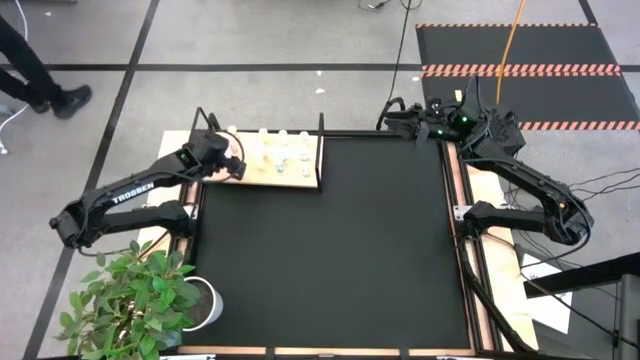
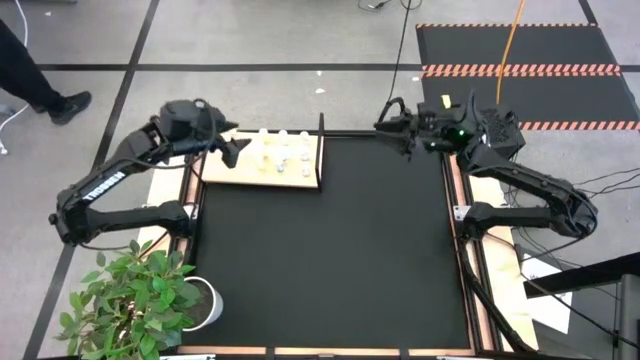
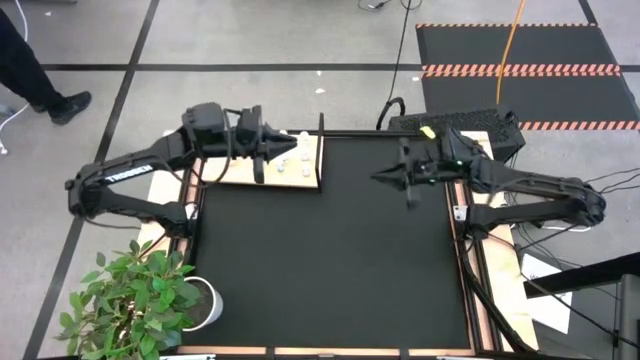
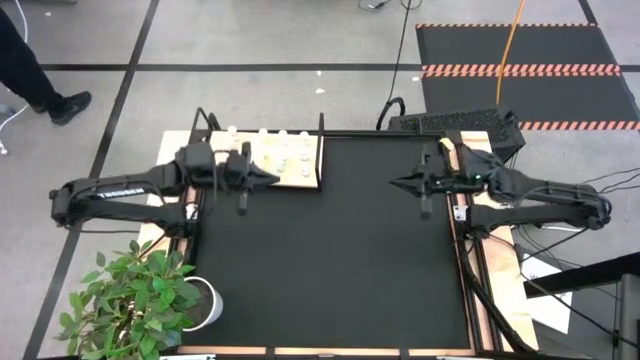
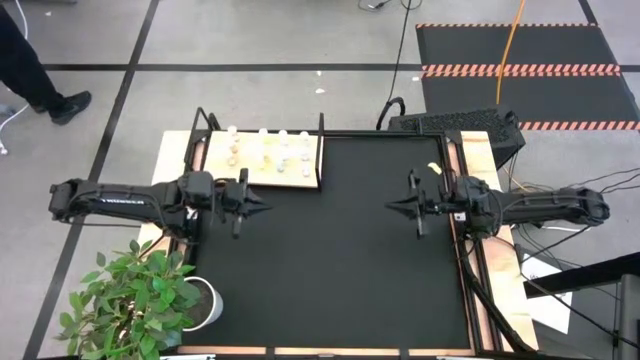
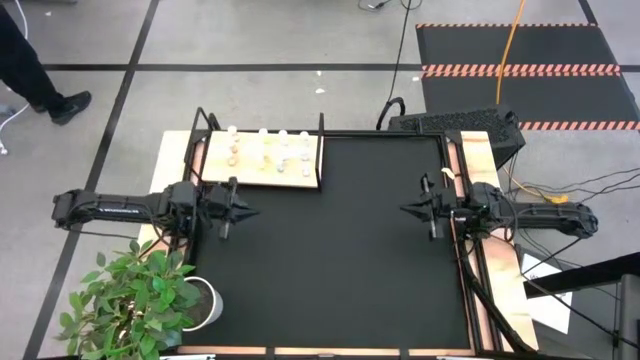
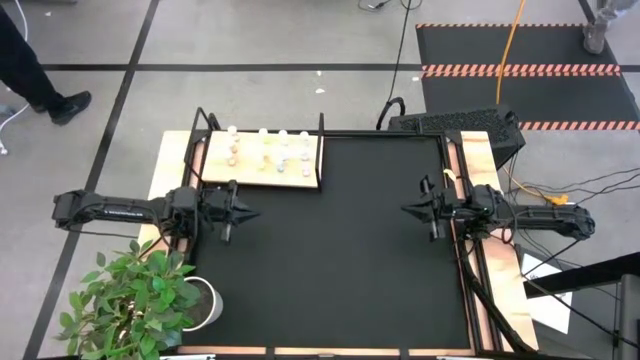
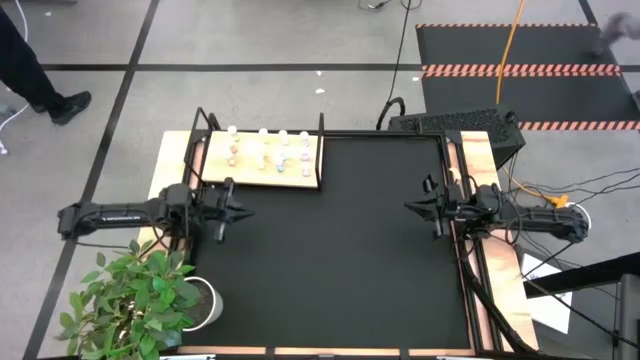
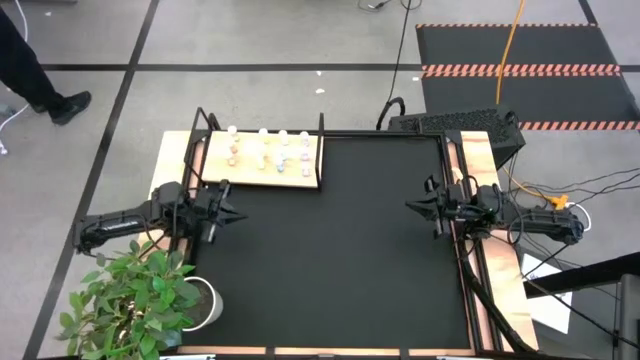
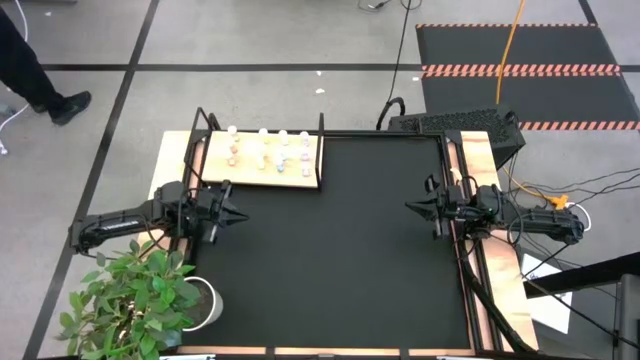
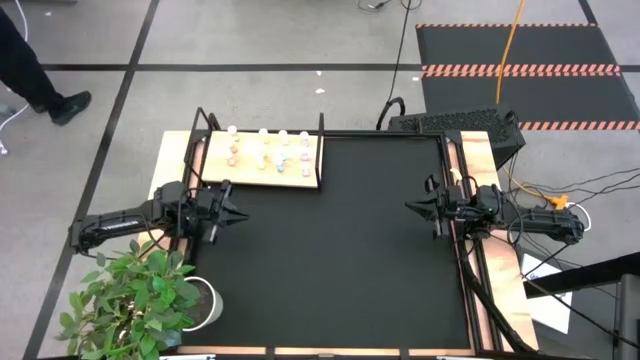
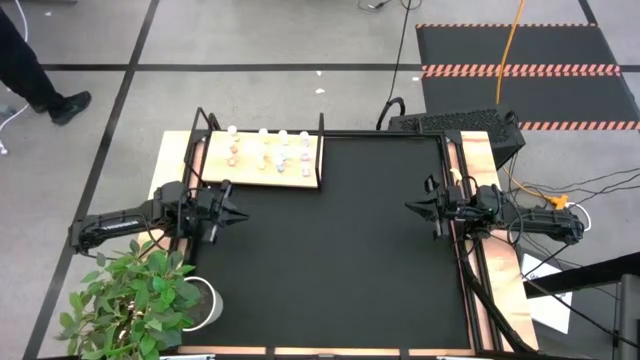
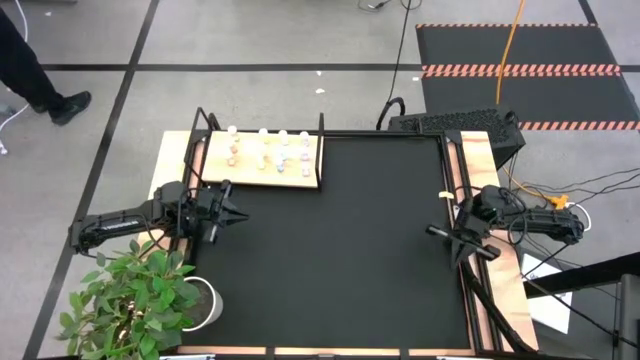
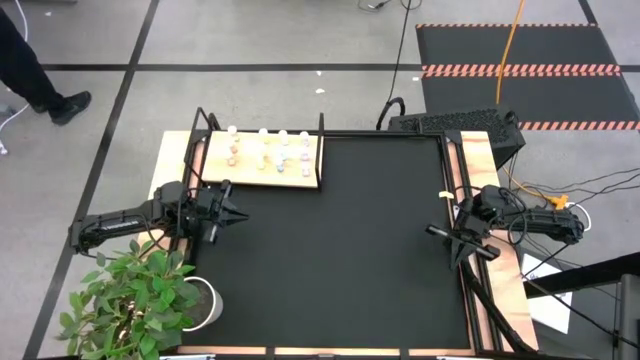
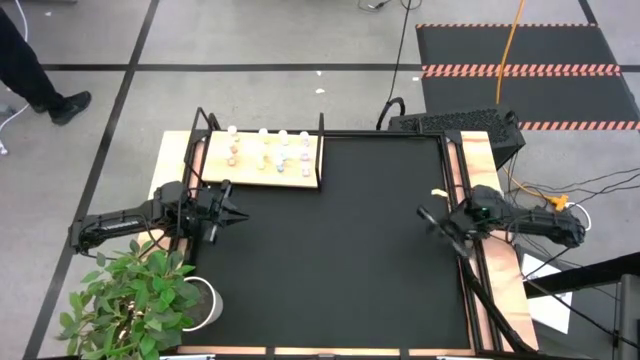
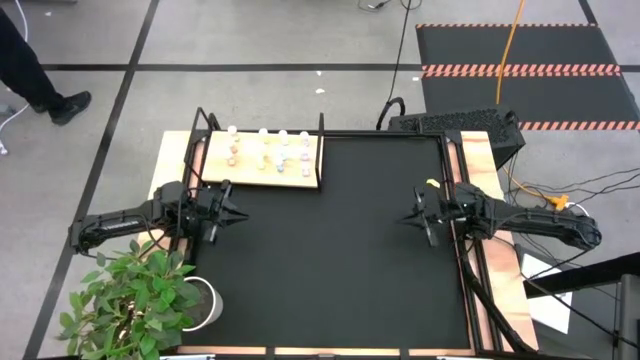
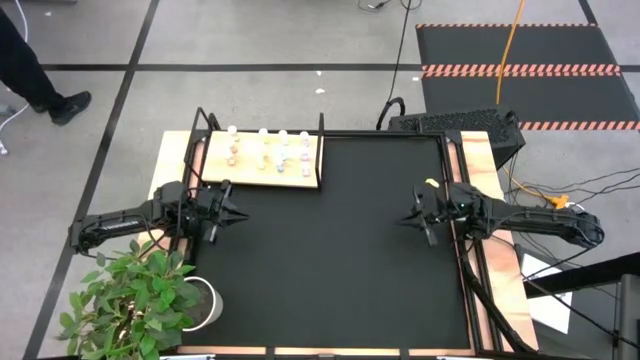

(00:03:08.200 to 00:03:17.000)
Task: Pick and place medicine bottles onto shelf by color
Return to Home Position

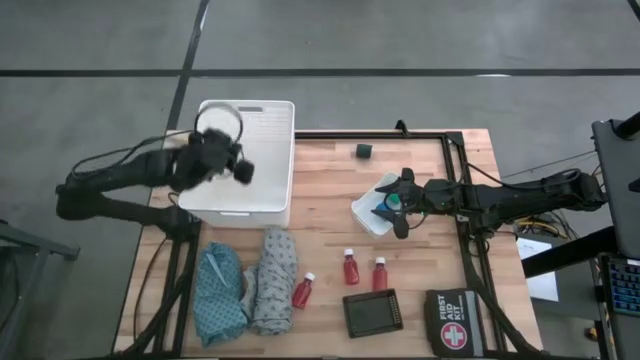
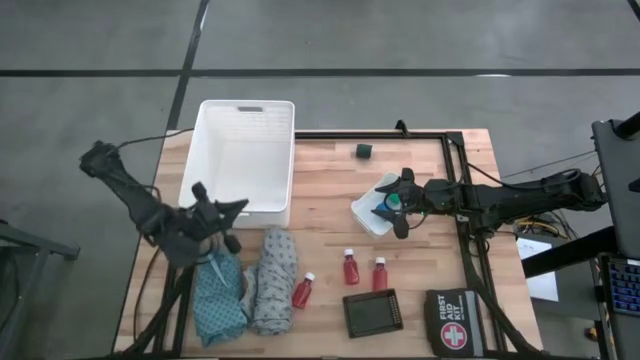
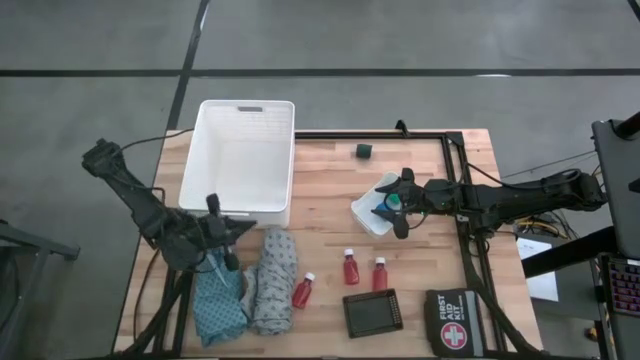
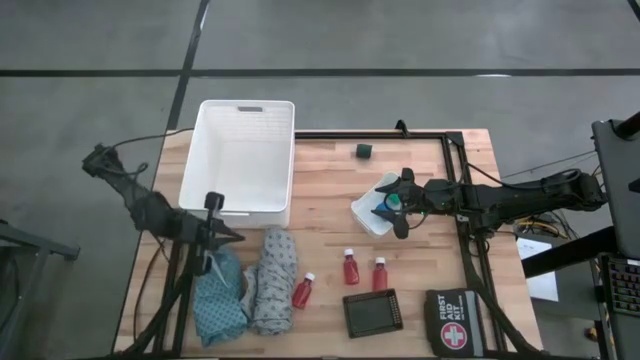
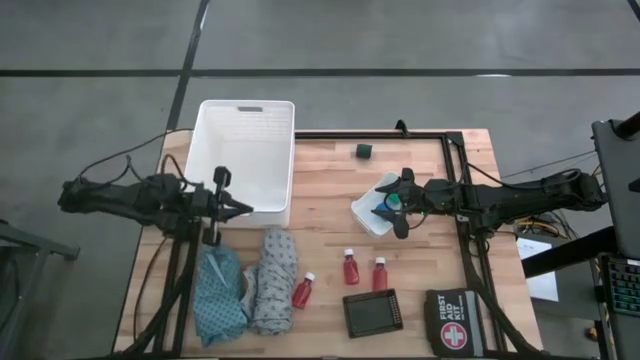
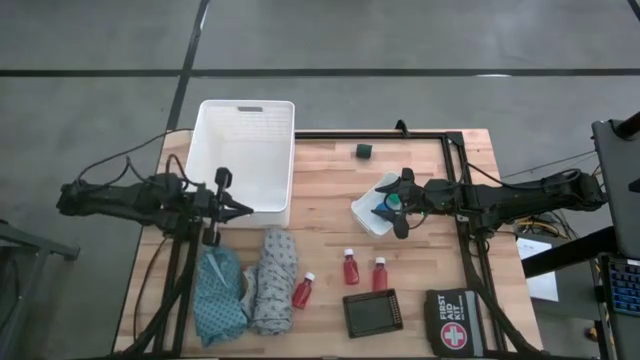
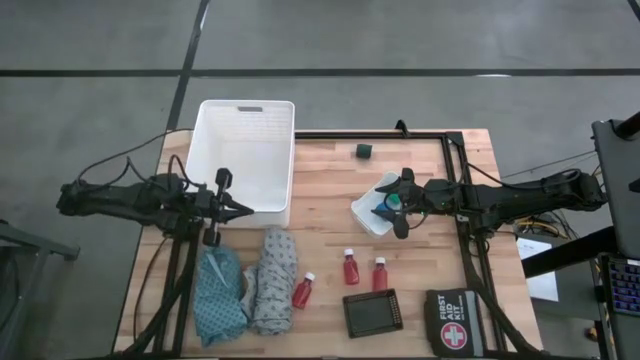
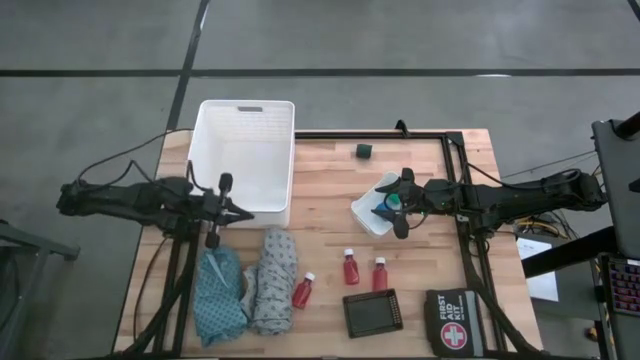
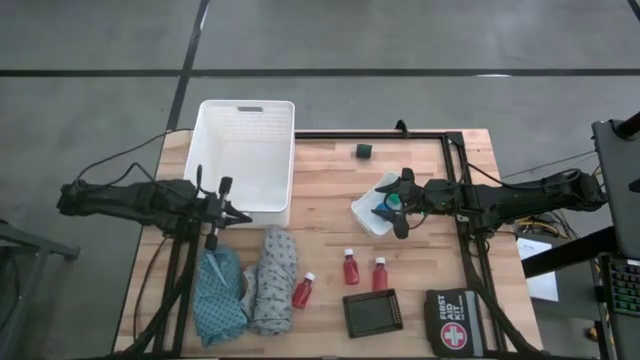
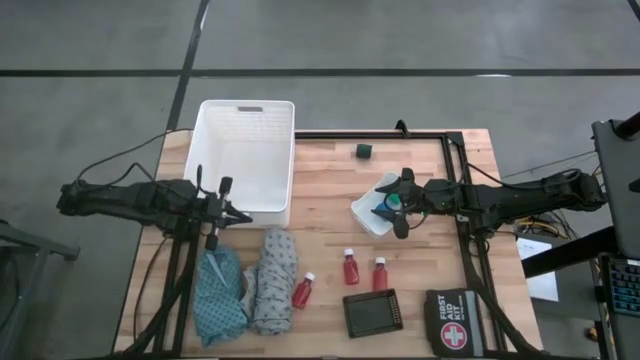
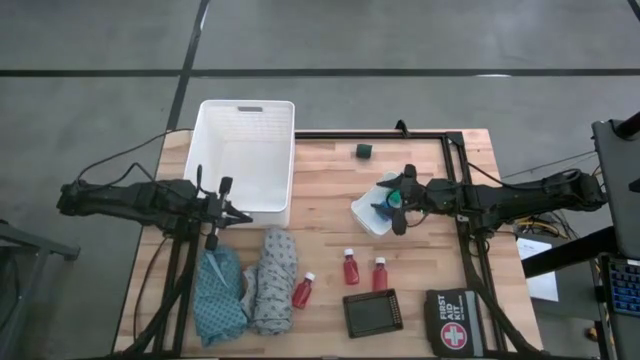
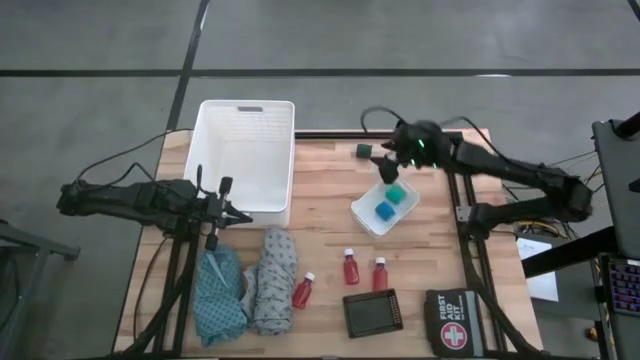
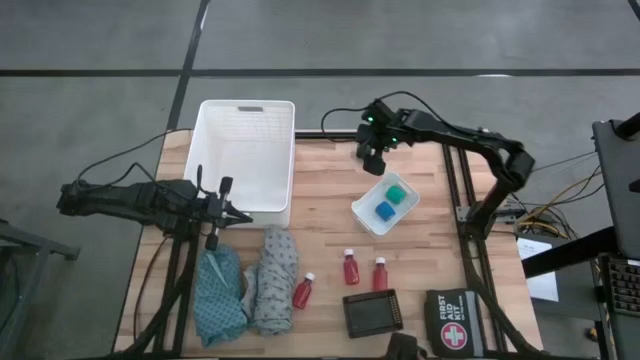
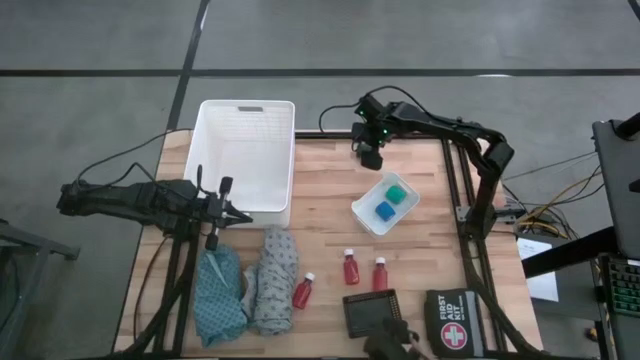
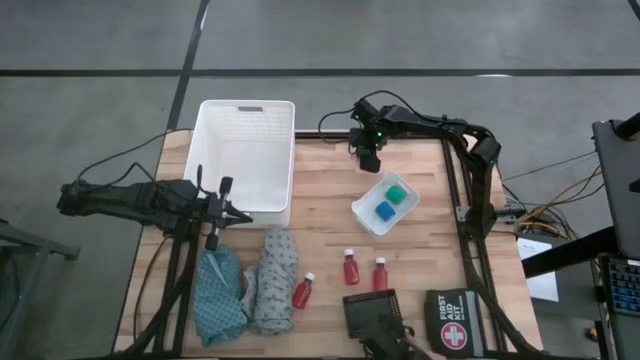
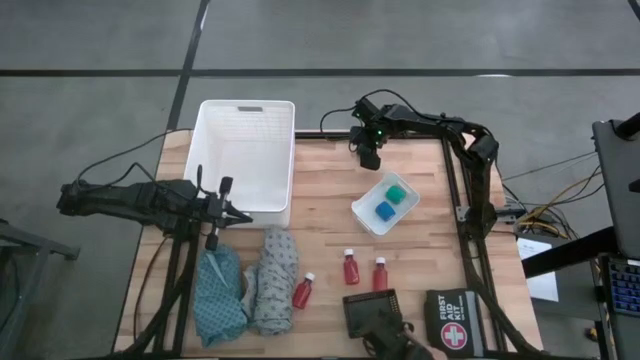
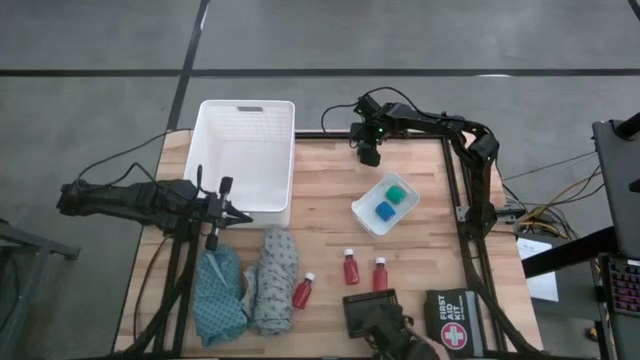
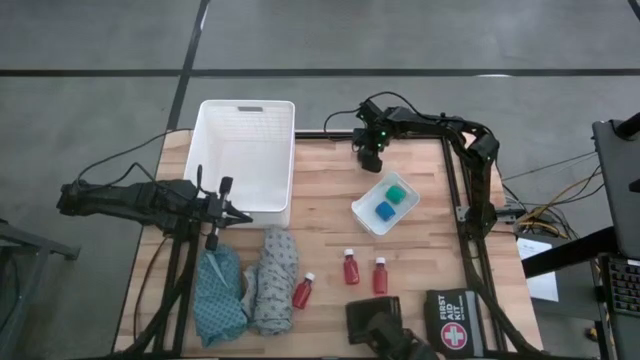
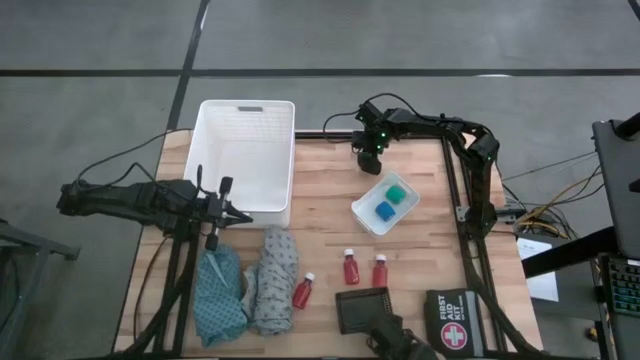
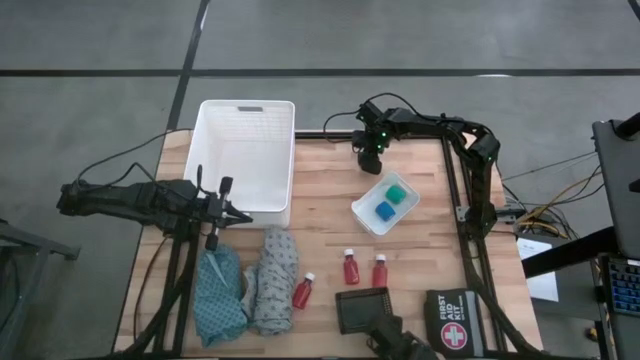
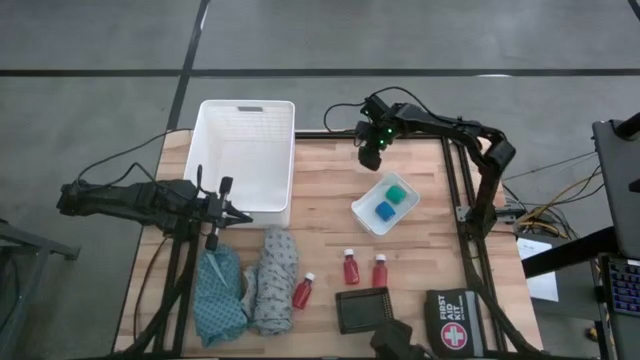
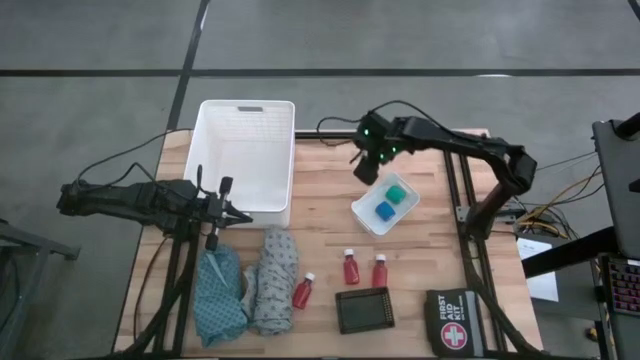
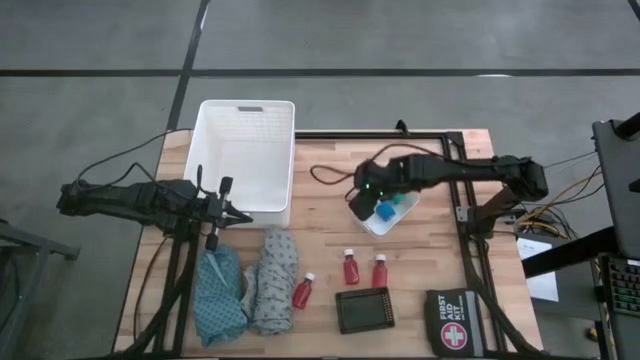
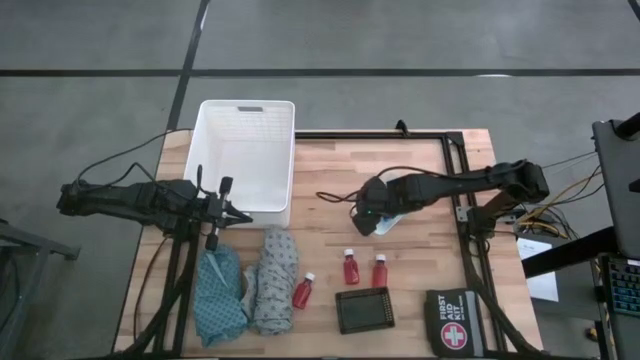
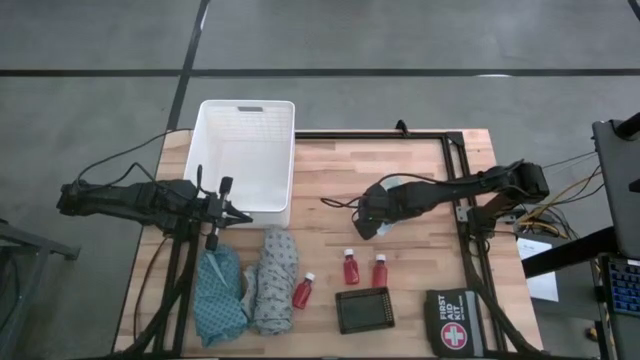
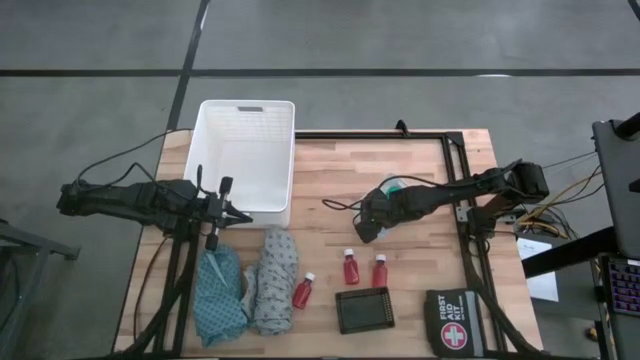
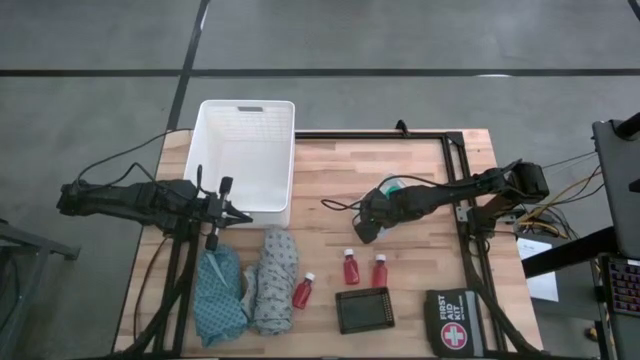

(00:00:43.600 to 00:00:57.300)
Task: Pick & place medical supplies in basket/bin
Put the dark green bandage into the small white bin
